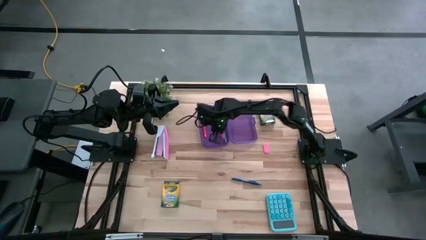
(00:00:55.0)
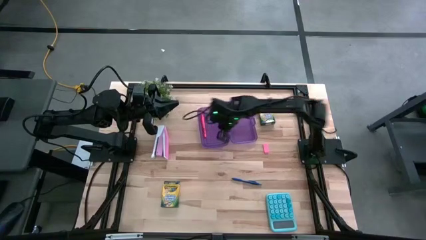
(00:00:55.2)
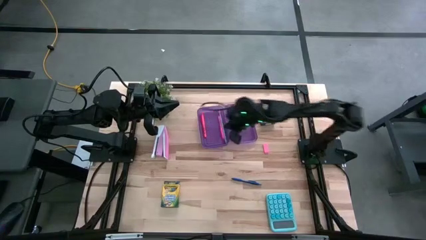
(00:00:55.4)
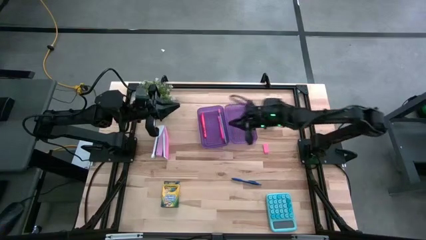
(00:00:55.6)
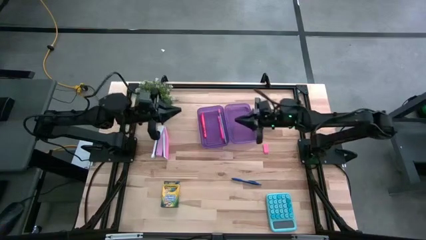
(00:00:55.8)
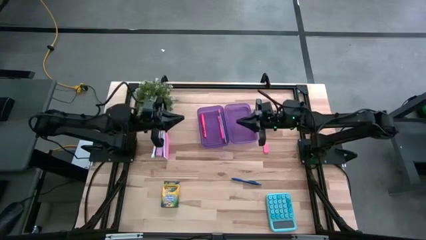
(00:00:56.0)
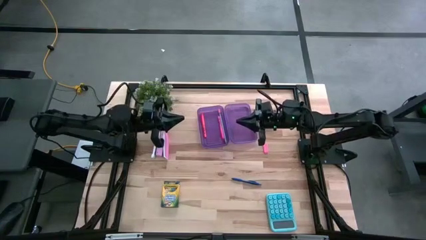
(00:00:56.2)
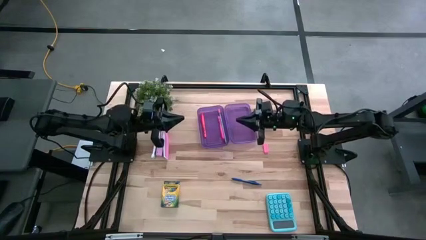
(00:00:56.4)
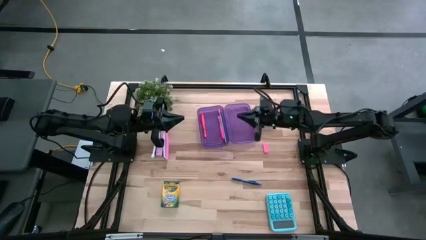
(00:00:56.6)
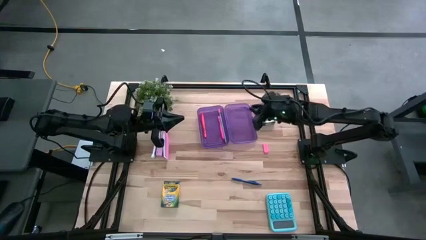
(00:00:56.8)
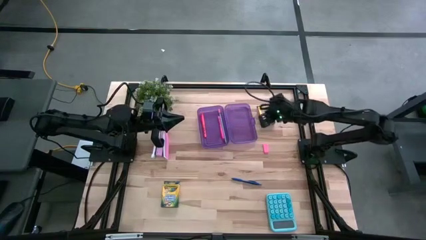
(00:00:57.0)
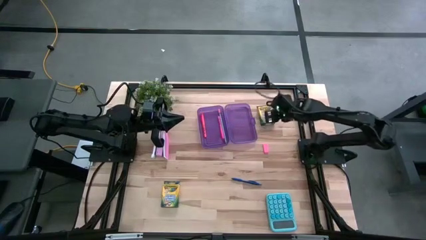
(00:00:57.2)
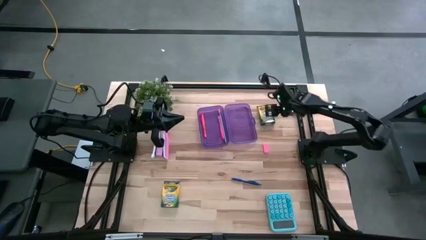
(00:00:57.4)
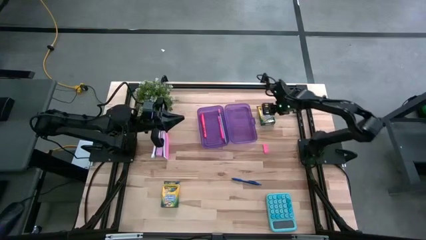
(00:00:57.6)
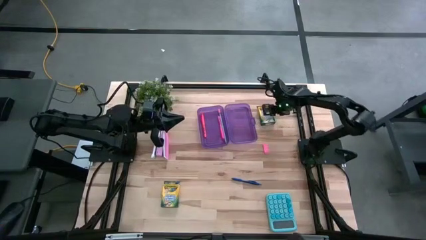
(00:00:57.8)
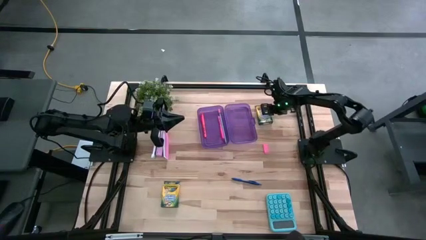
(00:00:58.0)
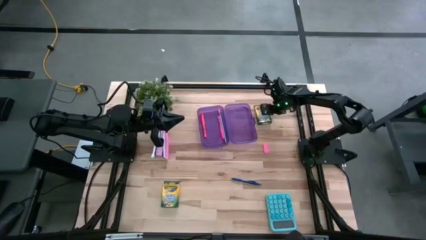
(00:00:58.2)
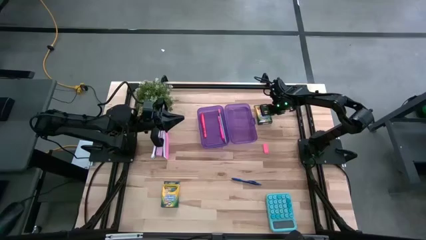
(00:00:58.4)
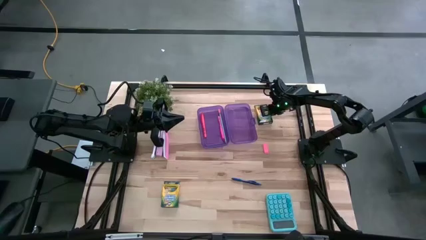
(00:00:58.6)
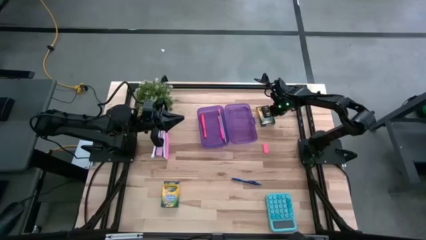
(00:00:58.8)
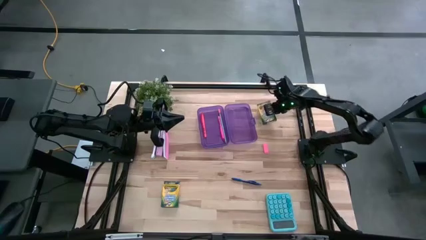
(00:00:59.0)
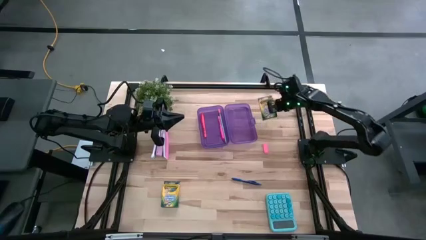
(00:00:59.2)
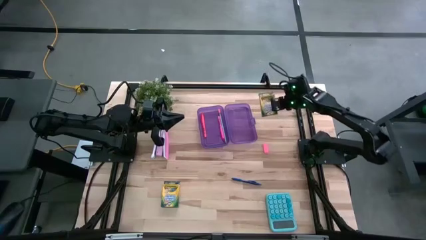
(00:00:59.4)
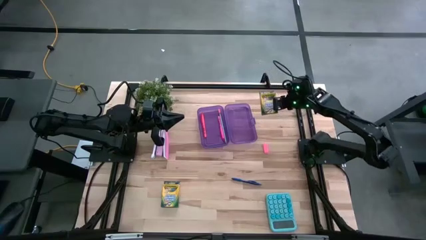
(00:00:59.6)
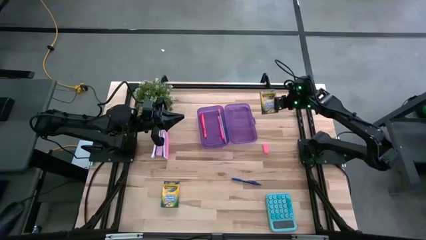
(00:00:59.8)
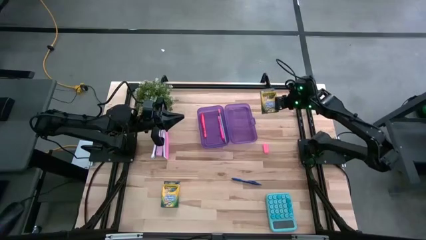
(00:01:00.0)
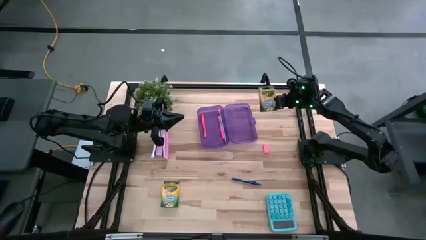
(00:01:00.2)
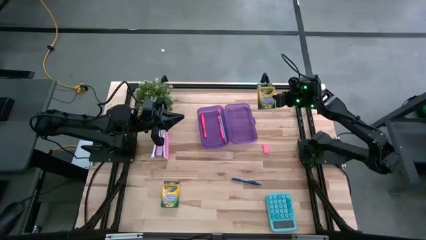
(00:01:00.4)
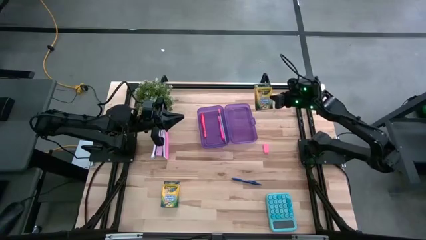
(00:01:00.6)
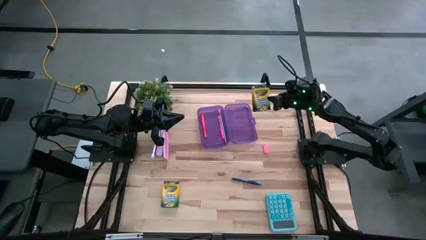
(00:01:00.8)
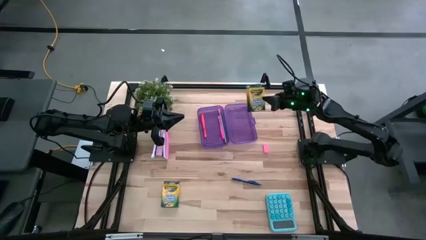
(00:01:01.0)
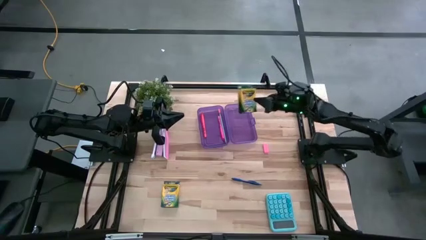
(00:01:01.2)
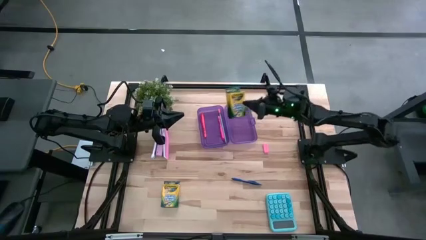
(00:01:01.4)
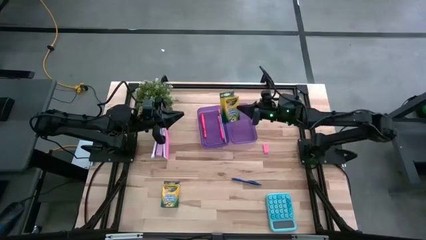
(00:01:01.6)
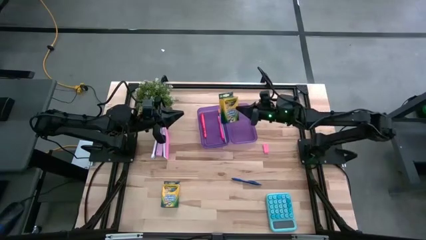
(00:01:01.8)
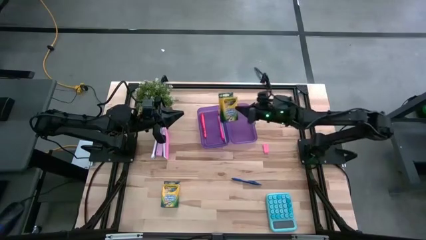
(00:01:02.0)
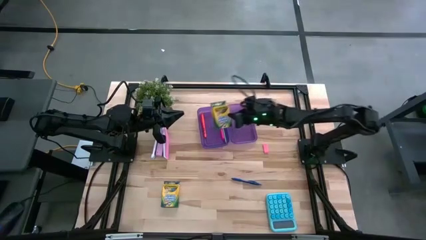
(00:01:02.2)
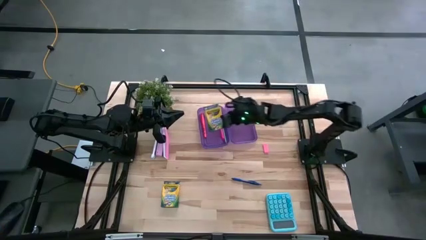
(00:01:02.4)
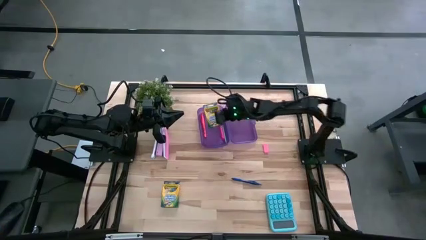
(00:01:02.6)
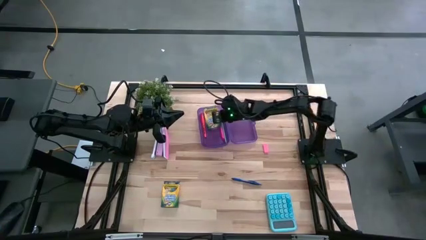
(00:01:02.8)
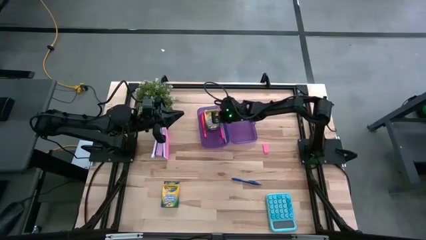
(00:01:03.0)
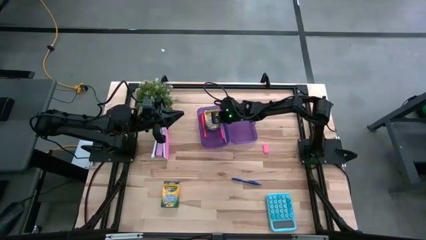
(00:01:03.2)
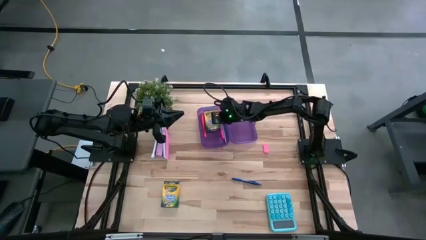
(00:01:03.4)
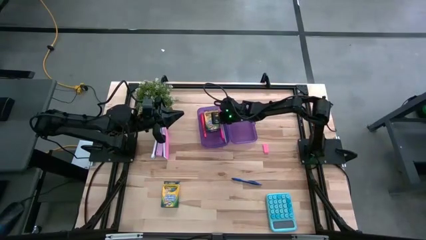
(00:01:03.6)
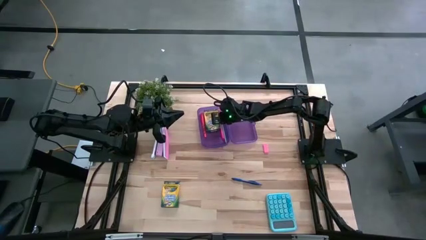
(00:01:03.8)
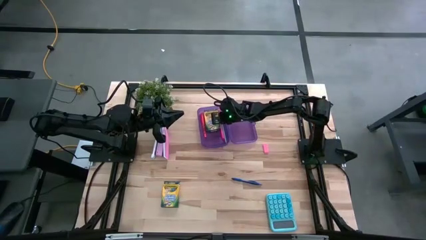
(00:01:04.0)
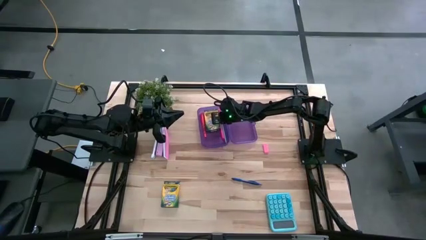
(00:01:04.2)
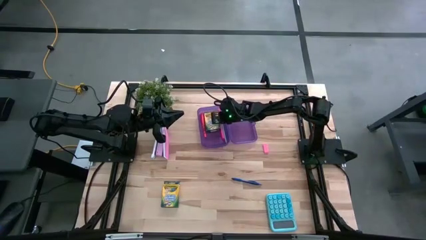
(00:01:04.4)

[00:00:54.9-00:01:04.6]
Task: Pick & place school supplies into a supply box
Put the right box of crayons into the purple supply box
